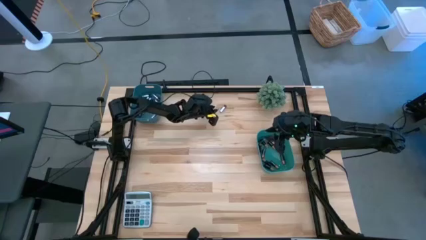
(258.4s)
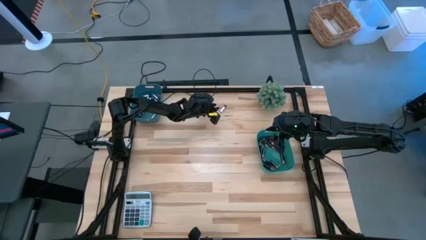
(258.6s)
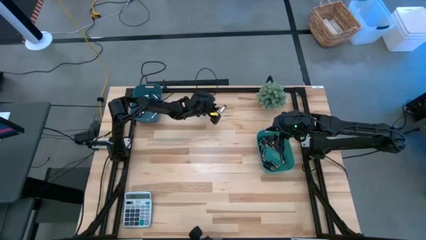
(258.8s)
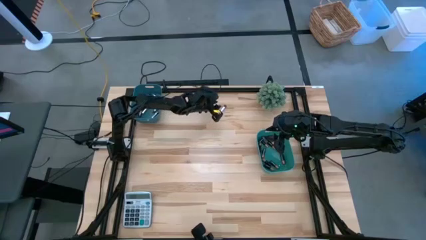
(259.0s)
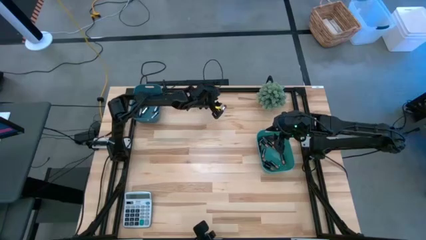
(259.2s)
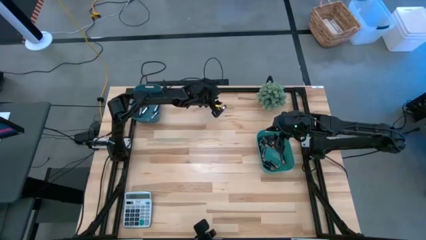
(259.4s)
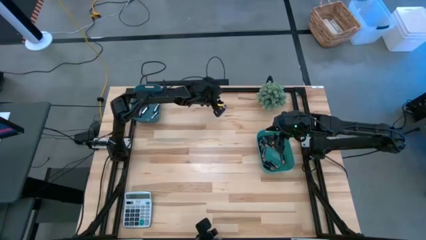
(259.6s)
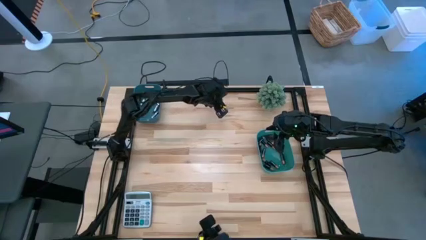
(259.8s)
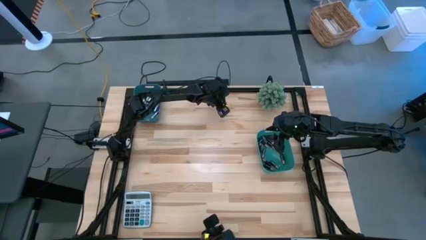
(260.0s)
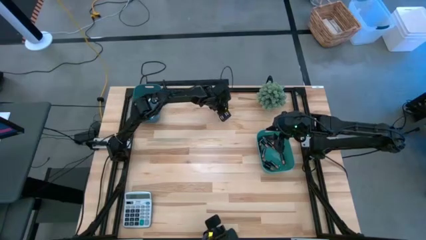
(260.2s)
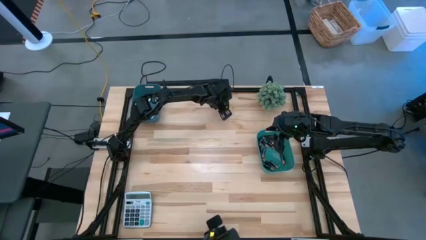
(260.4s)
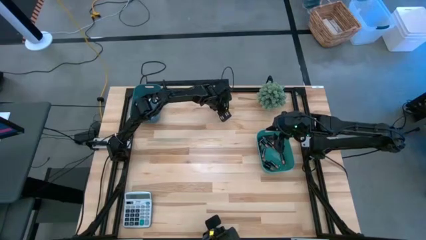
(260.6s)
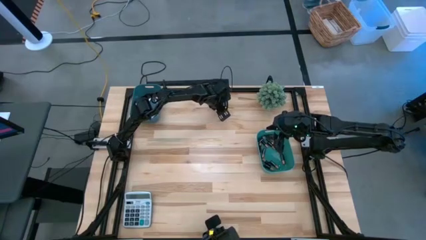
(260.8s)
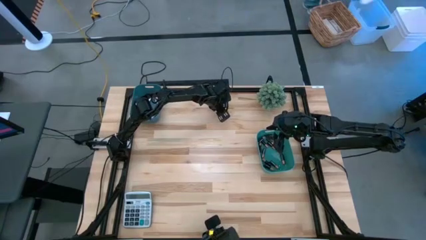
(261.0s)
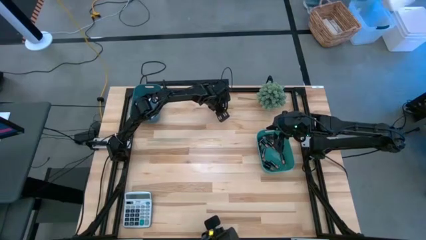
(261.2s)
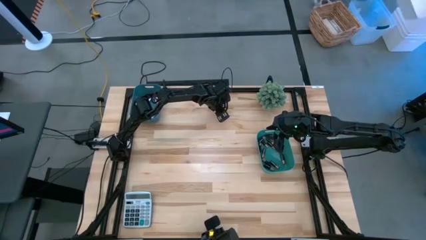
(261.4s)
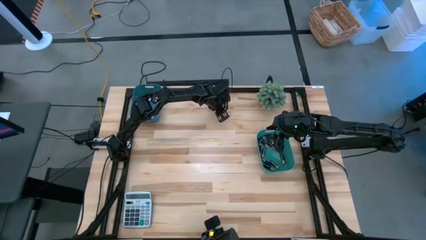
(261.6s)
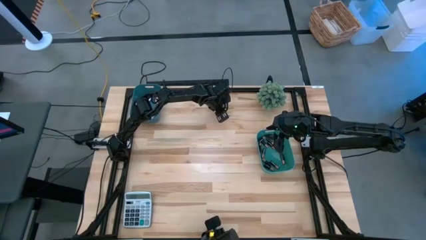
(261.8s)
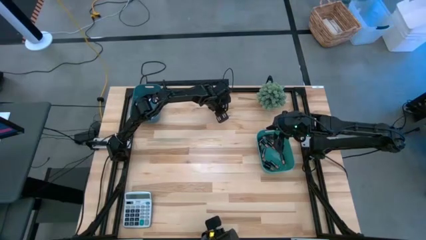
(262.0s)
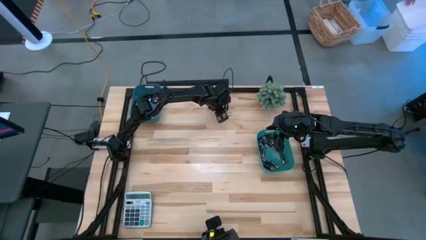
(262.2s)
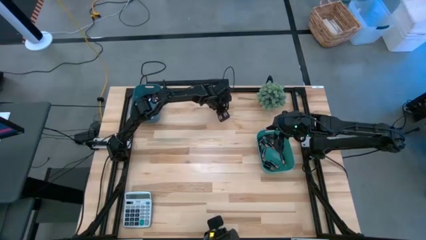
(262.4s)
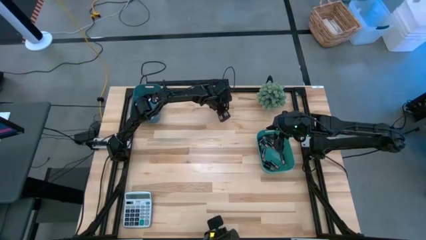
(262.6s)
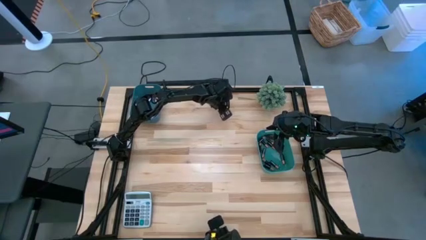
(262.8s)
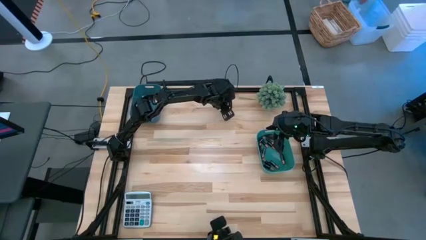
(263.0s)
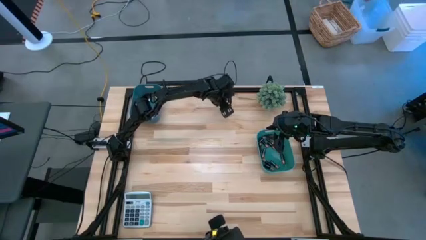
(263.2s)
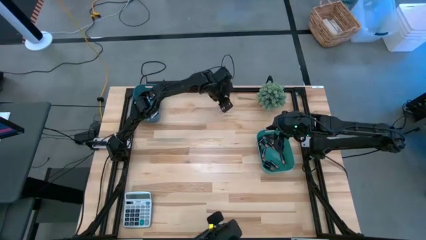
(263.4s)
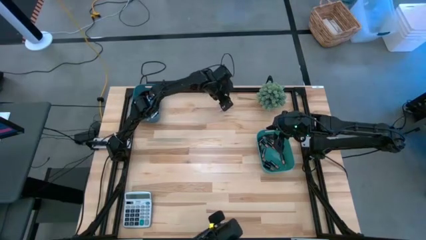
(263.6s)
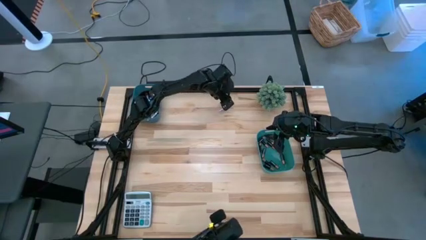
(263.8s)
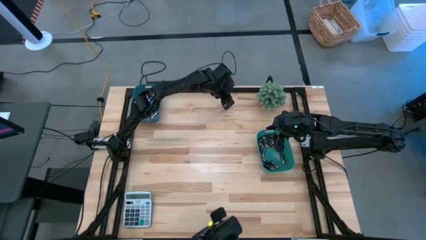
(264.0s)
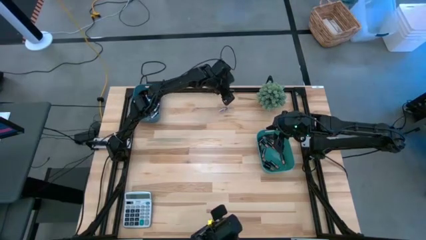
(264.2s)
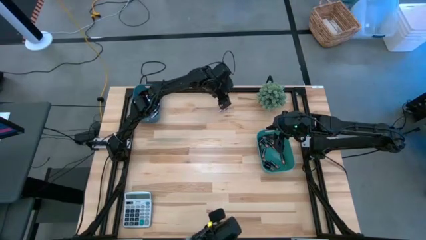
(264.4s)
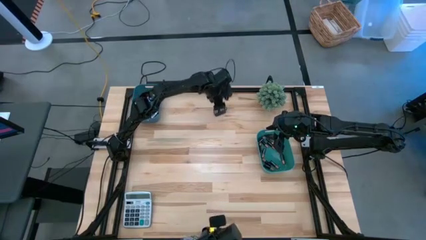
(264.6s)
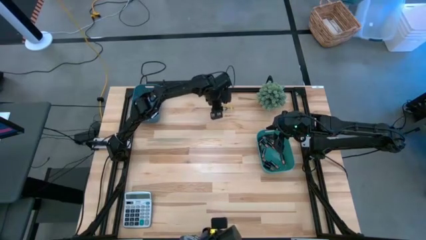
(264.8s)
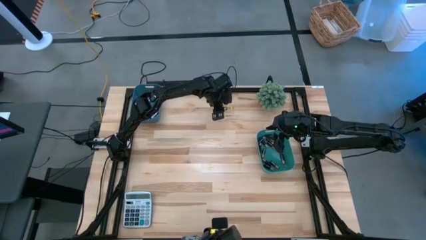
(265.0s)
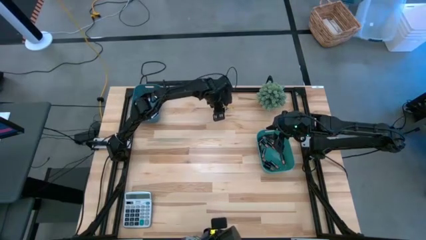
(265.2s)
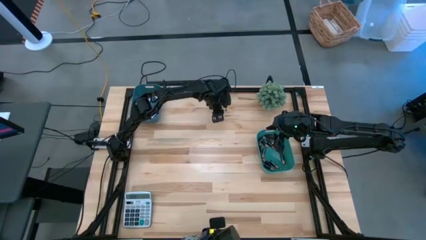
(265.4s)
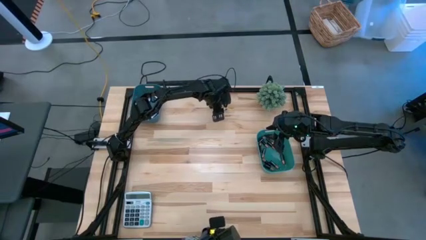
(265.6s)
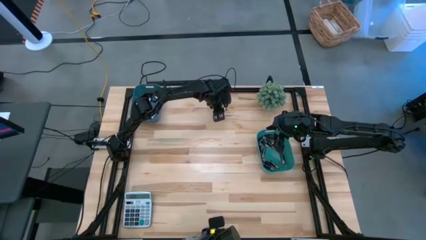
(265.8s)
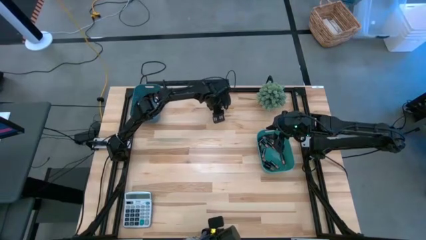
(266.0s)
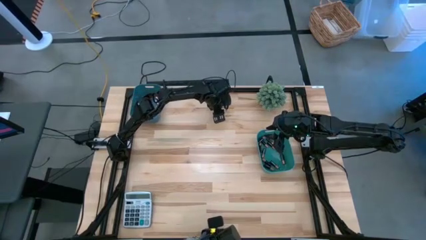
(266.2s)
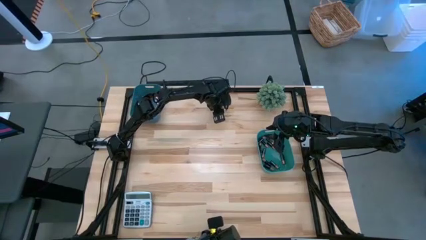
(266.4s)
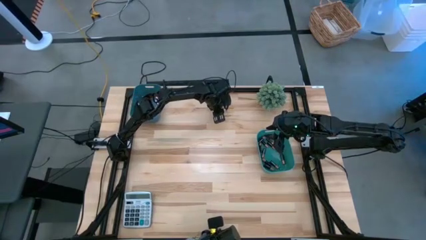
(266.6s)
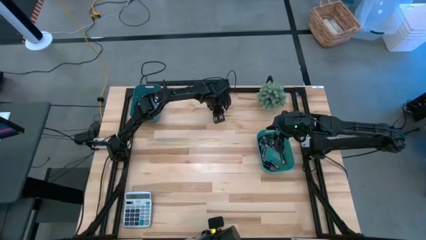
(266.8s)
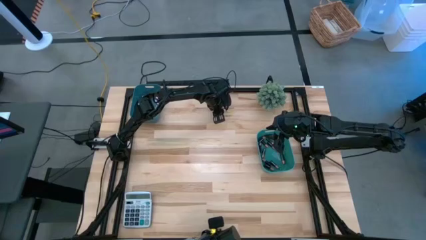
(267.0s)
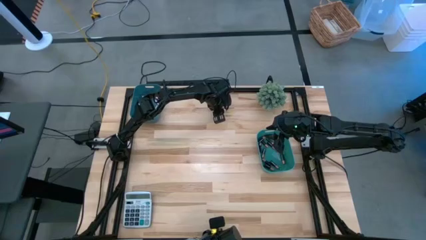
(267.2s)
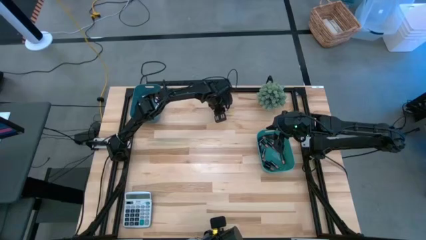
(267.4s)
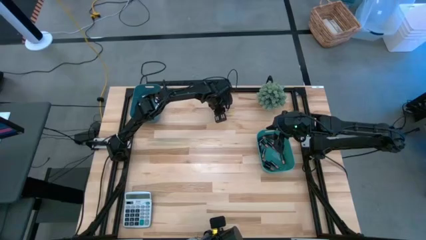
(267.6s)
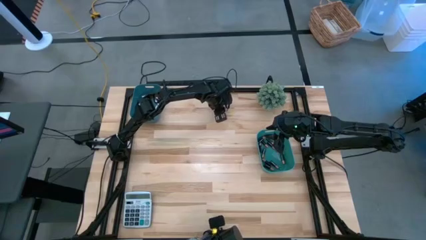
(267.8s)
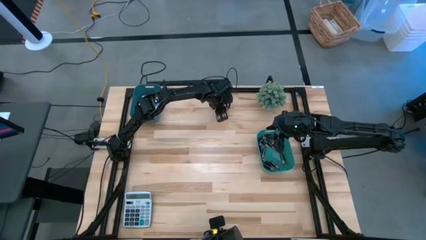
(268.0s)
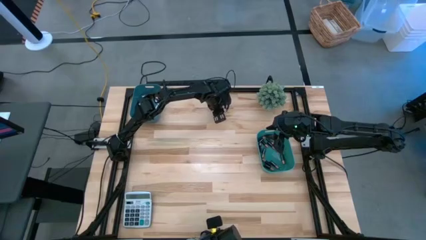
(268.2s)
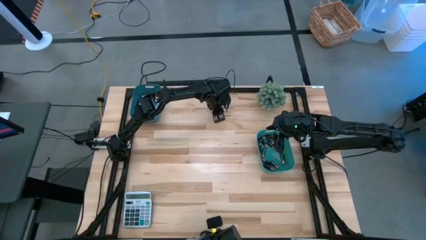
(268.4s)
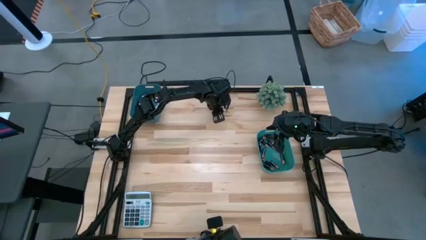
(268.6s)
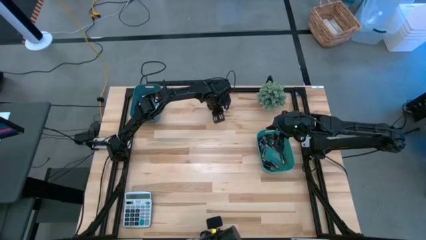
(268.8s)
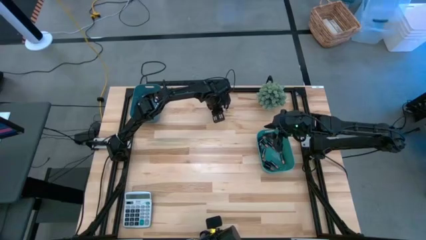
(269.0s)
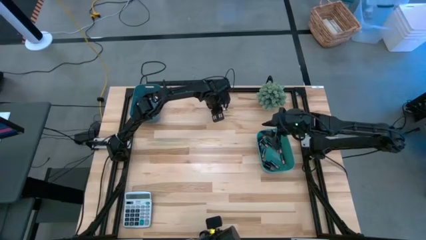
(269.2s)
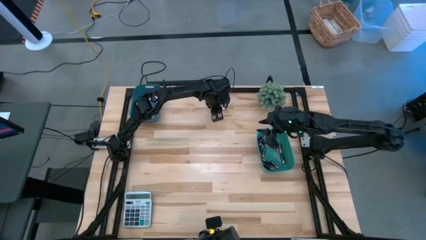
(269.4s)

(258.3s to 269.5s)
Task: Sort batteries
Put the black-silver battery into the blue bin

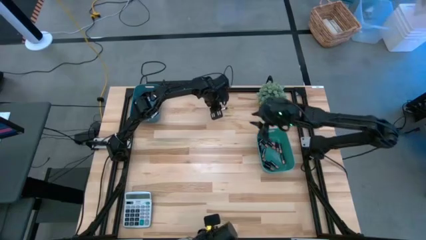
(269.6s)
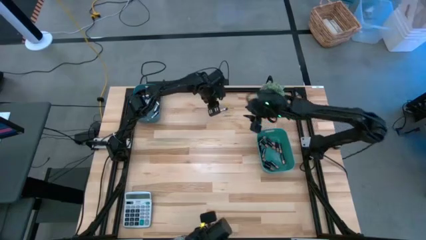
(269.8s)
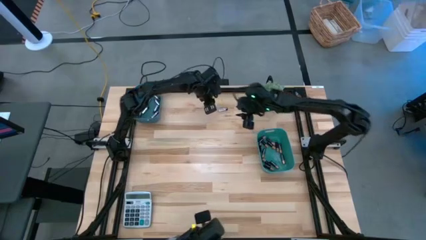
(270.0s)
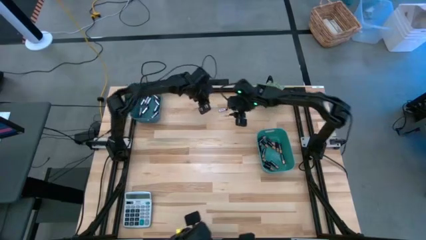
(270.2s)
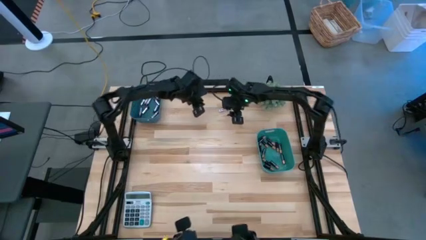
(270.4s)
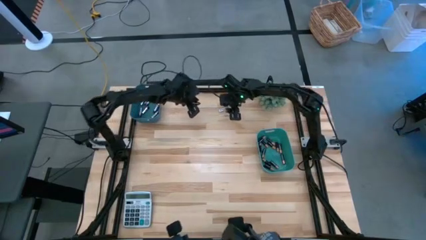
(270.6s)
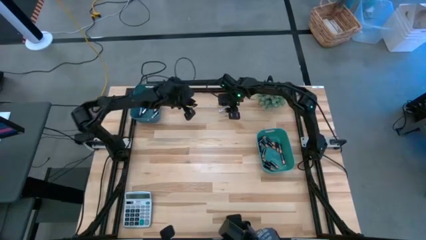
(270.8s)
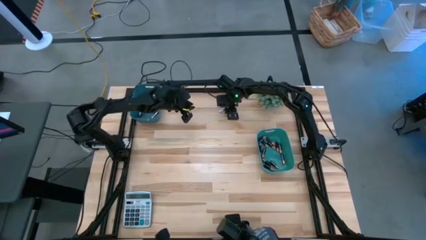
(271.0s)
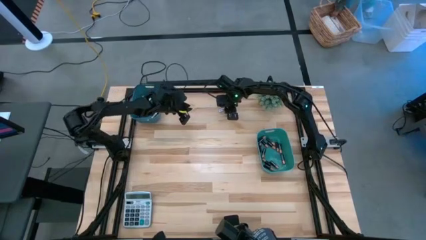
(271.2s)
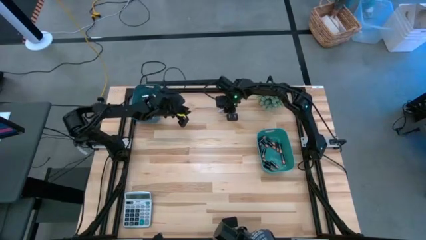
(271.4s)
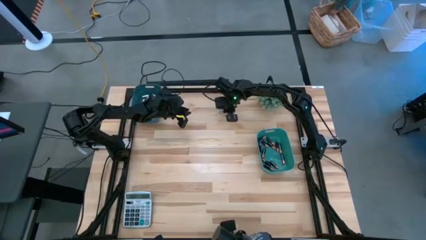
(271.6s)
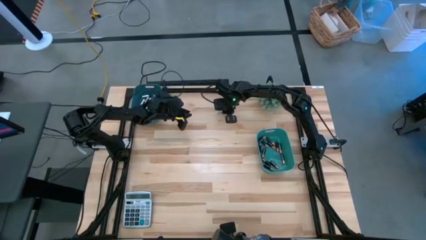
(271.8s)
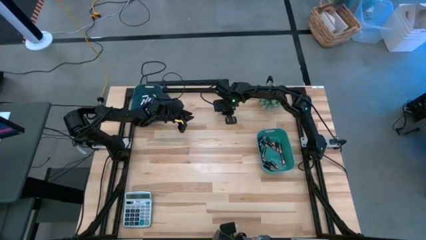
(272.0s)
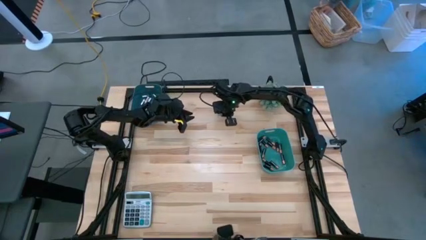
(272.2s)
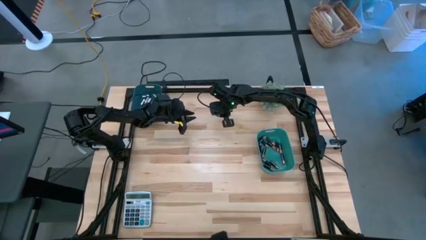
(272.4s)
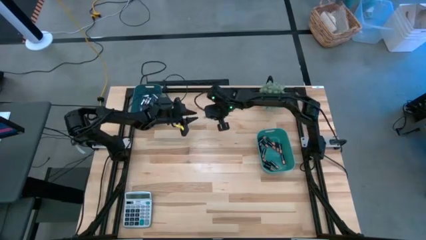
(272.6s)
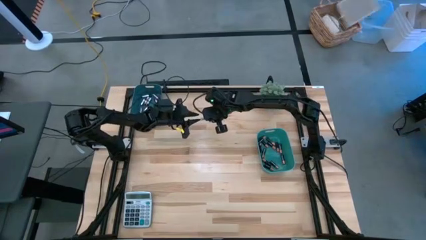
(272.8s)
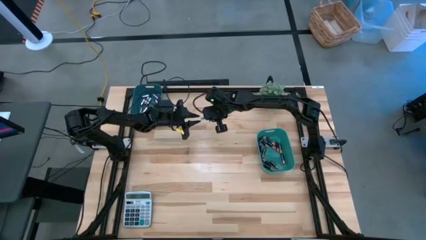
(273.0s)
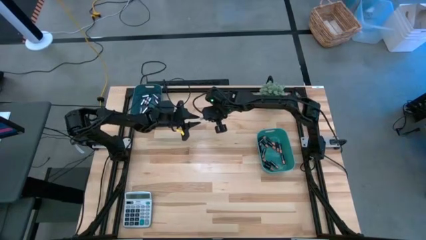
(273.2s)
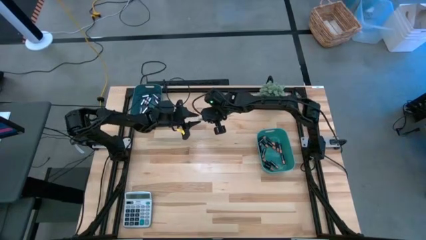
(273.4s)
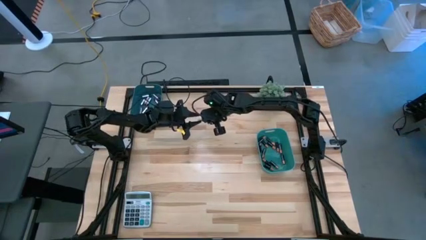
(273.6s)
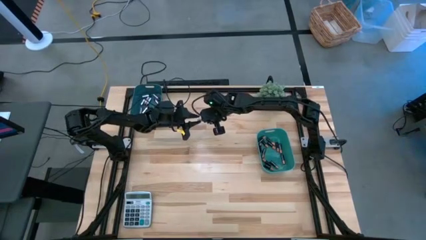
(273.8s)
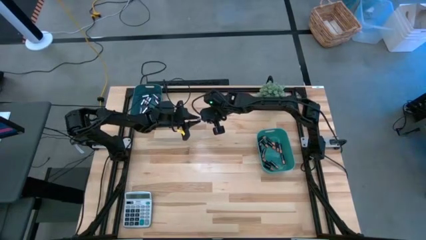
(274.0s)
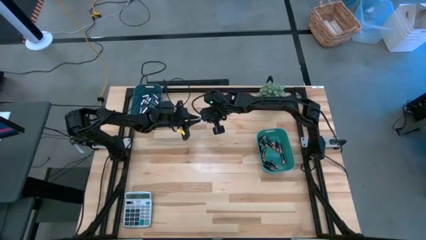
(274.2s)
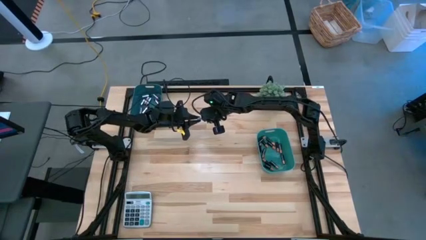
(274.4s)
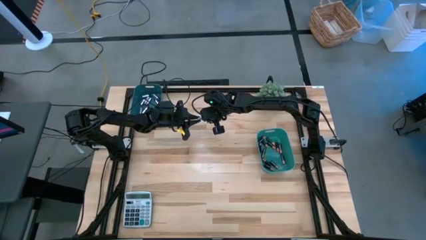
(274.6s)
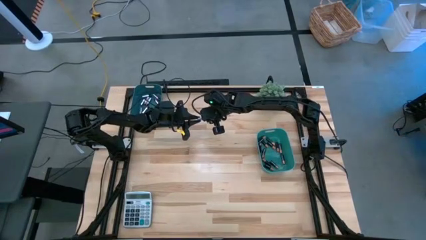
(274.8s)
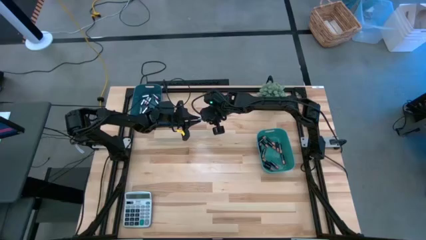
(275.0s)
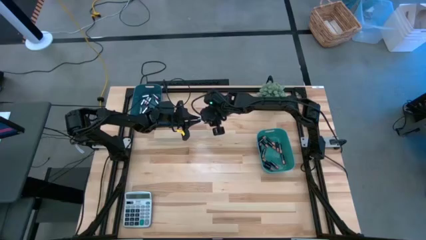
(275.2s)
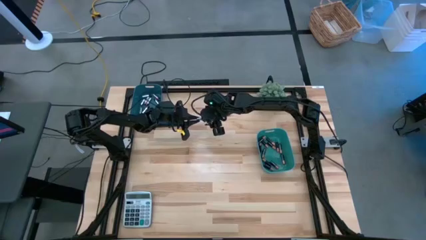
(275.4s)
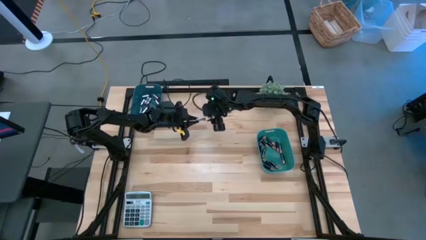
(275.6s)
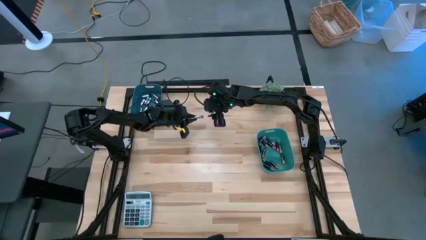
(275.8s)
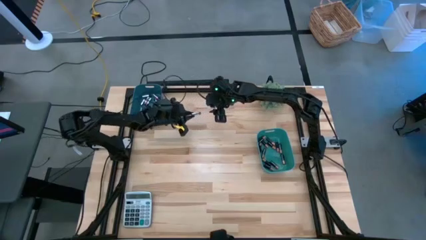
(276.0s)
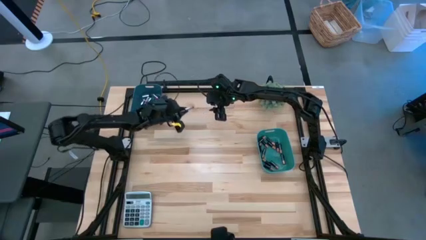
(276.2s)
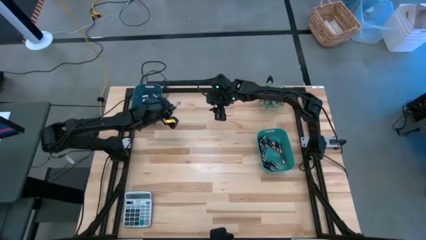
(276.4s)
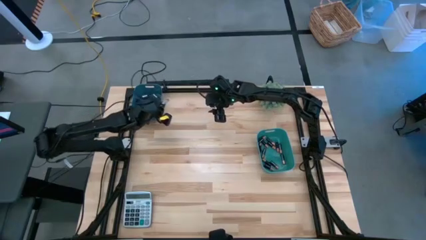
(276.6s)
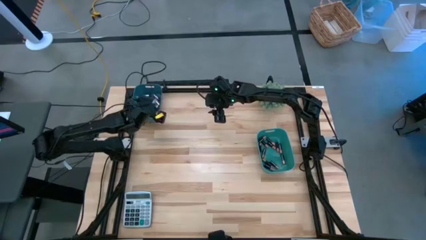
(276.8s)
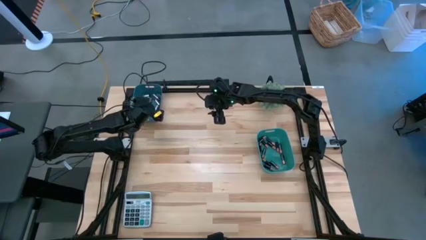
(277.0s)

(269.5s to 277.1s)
Put the black-silver battery into the blue bin
